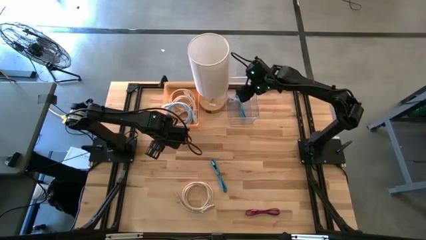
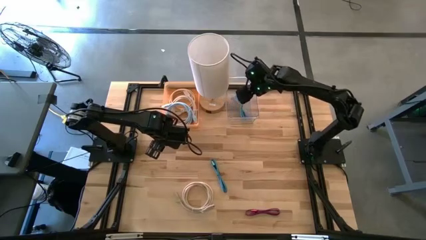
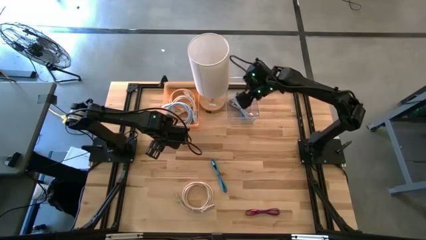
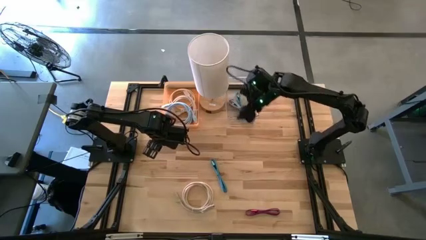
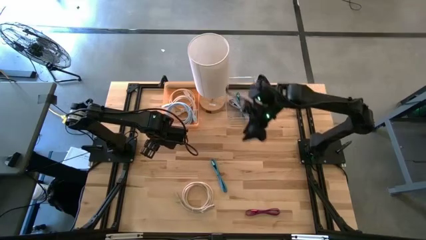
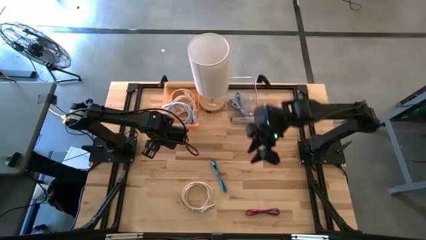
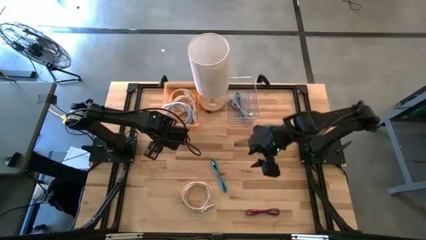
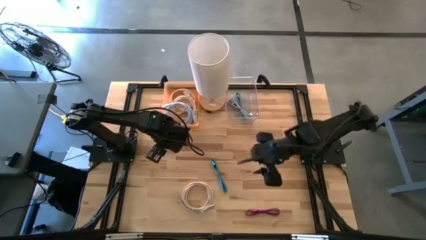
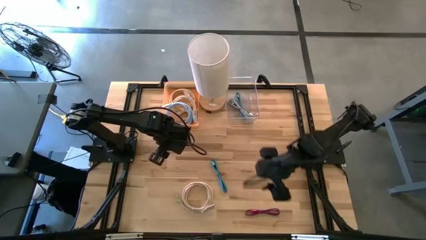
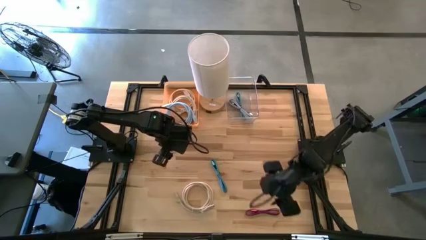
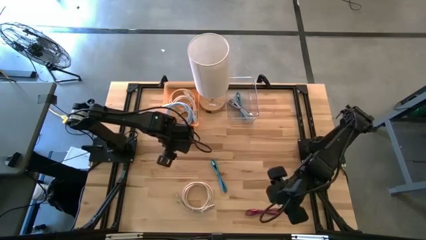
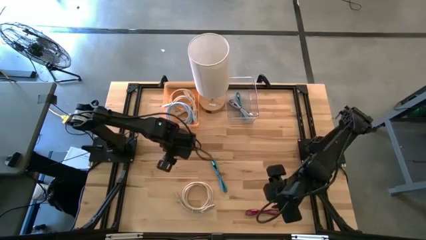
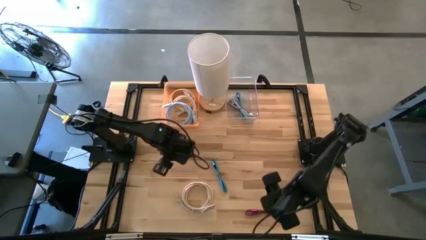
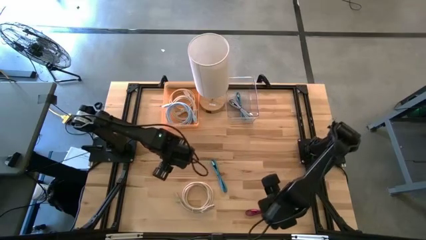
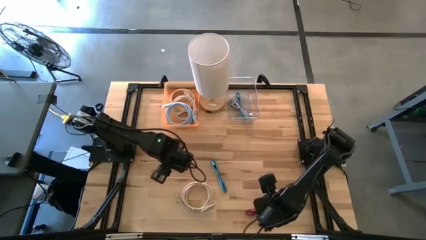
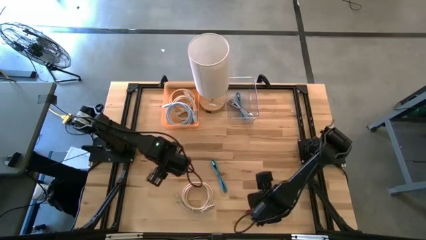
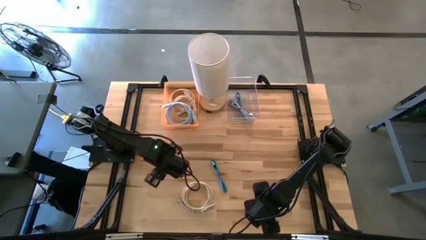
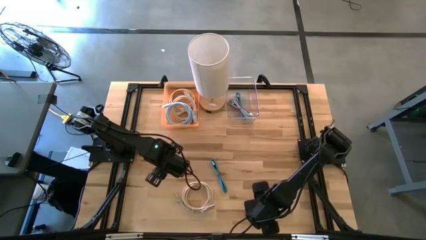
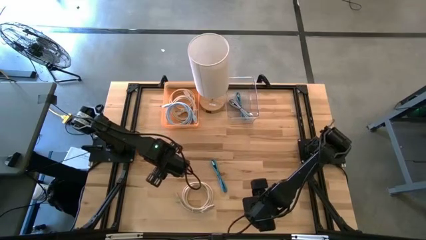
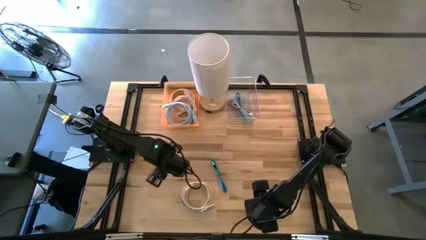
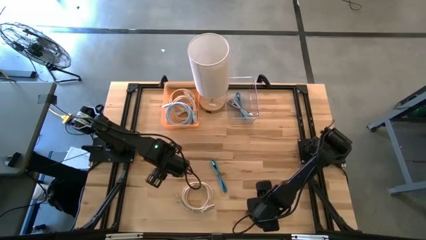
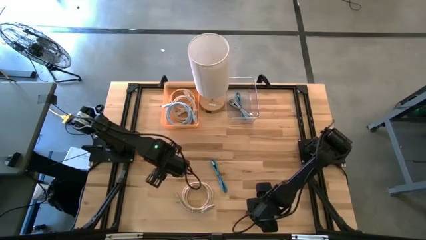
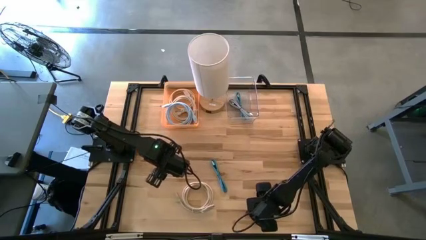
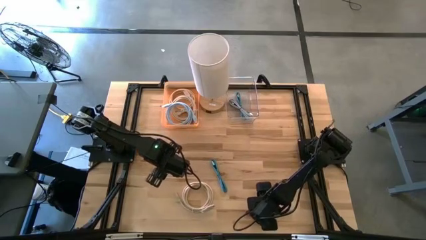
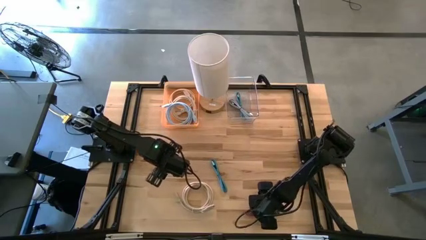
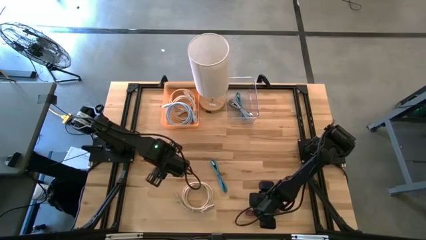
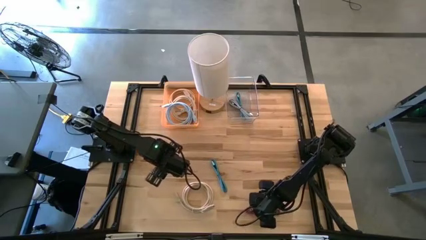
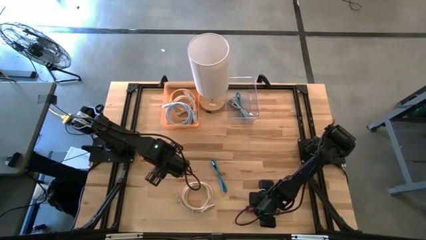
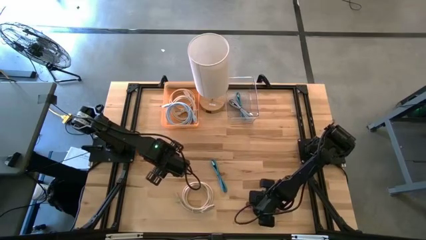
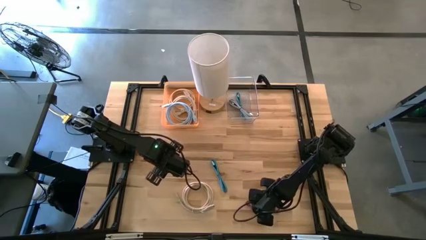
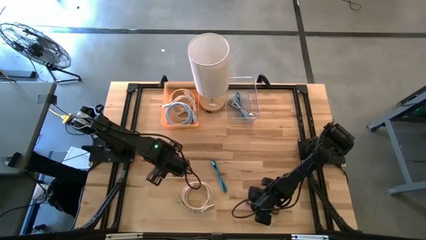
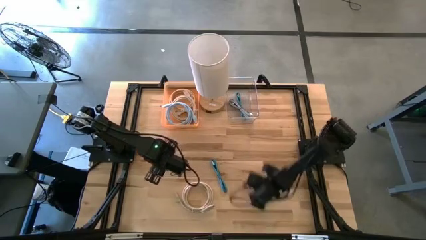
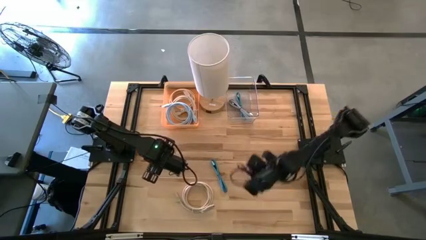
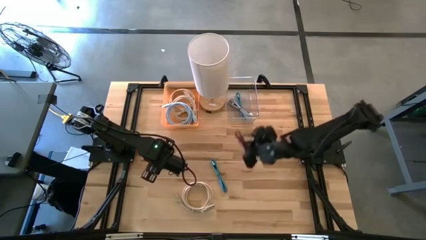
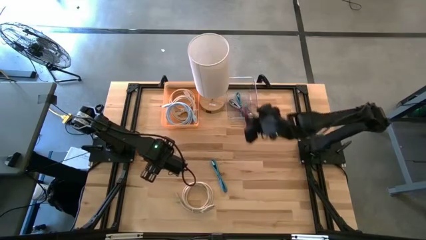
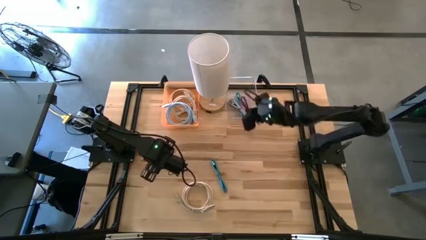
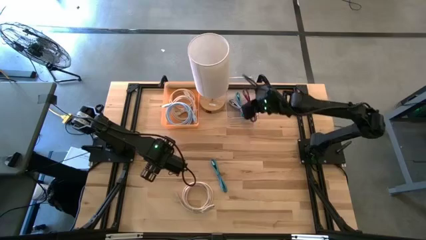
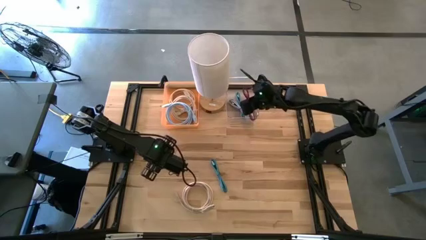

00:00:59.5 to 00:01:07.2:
Task: Pick & Place USB Port
Put the pink charger cable into the transparent bin

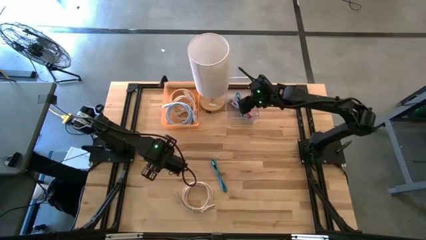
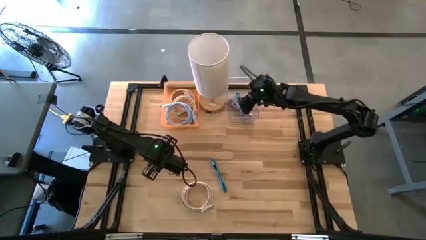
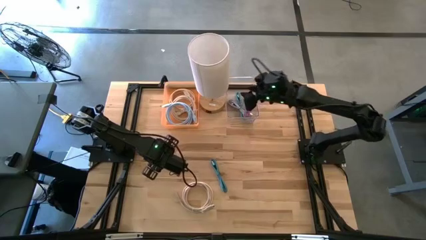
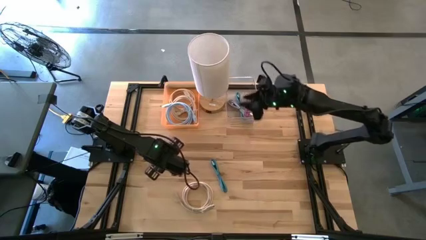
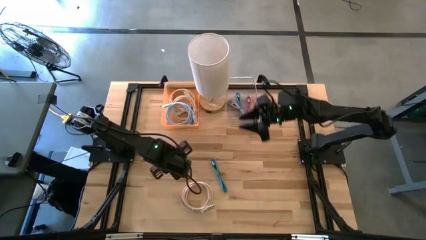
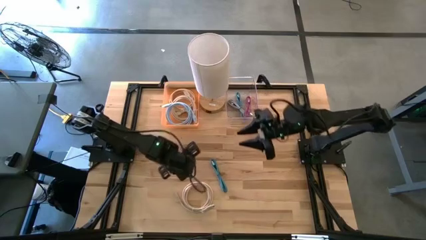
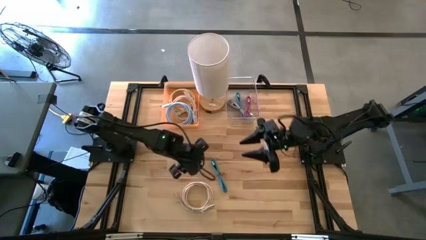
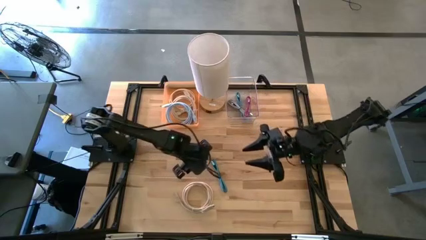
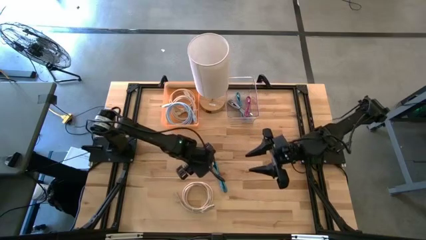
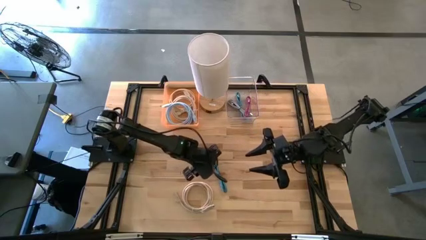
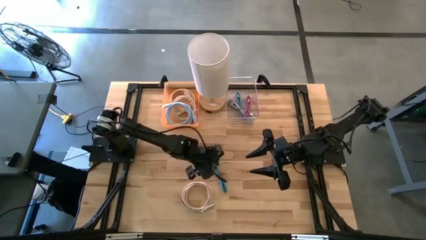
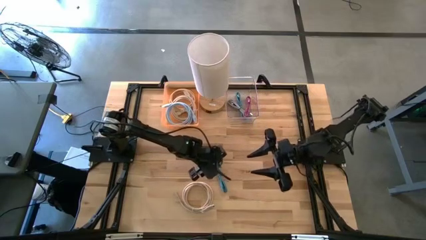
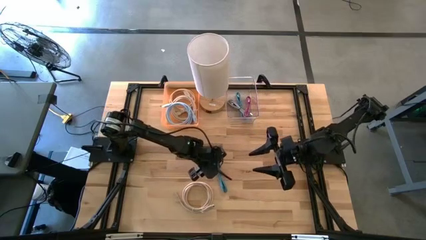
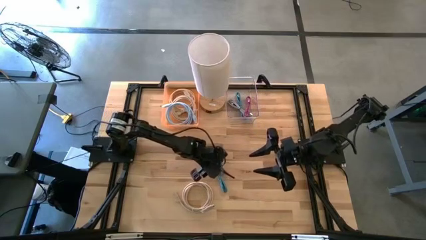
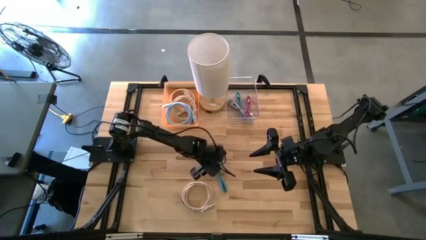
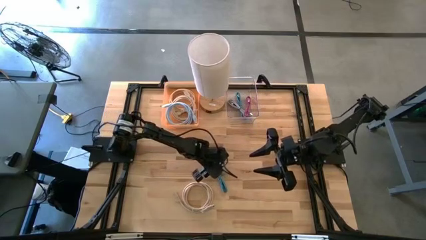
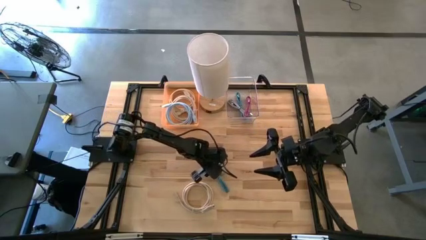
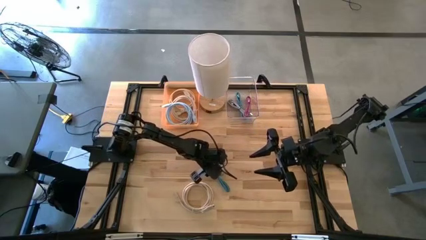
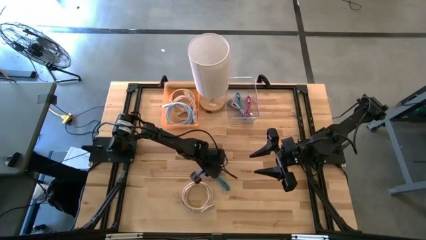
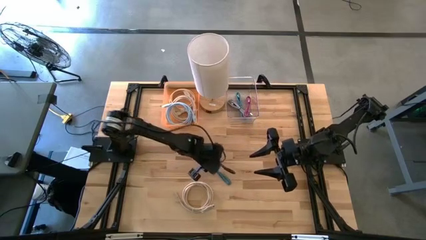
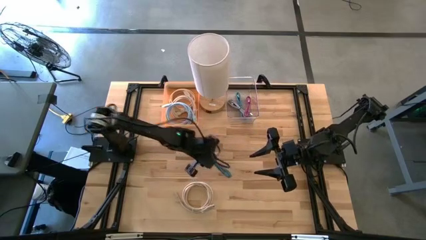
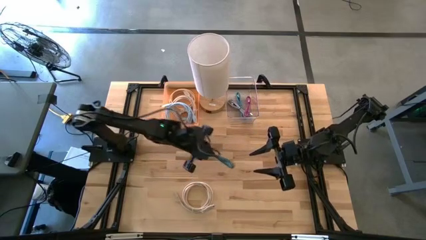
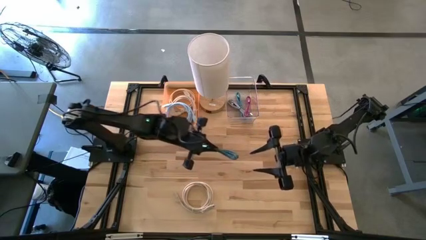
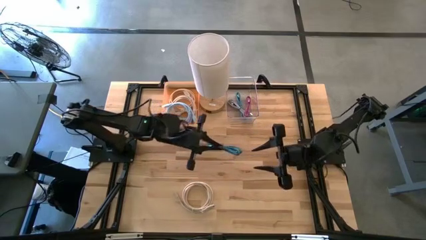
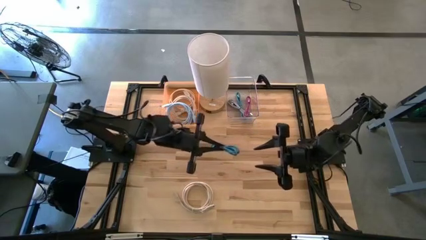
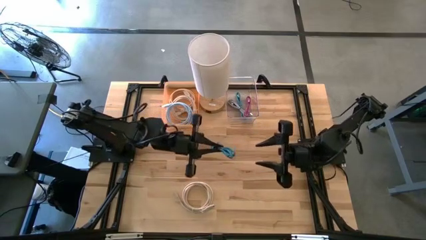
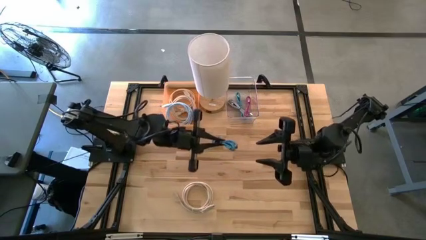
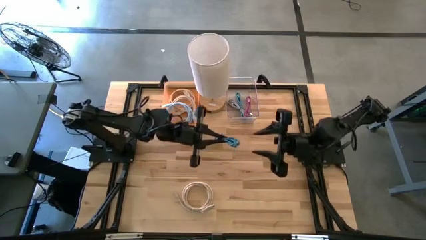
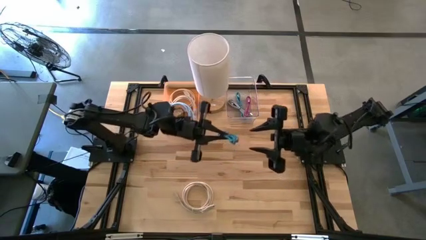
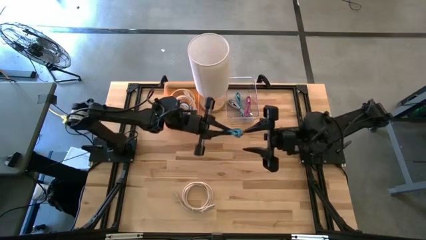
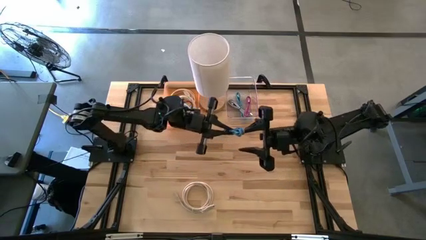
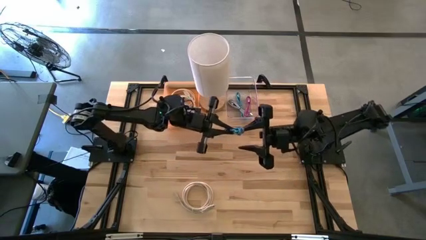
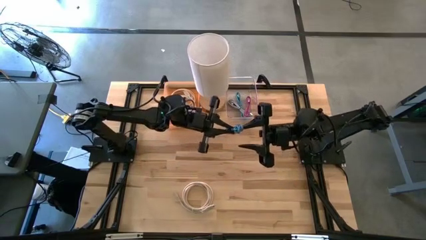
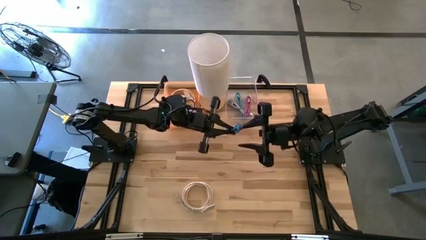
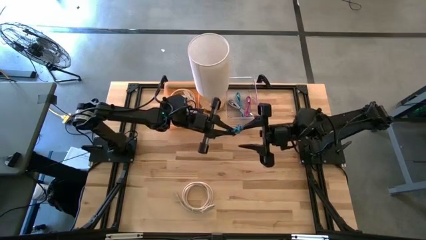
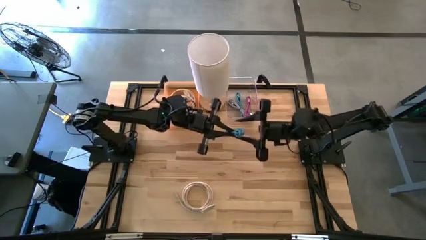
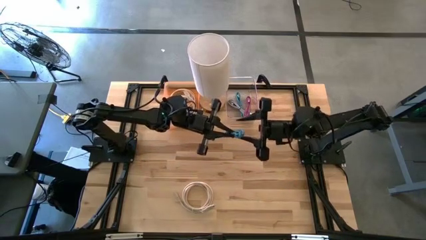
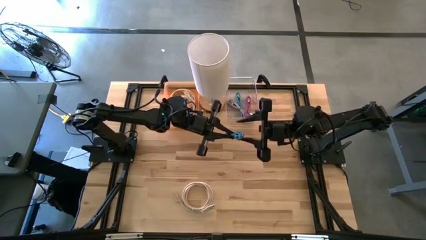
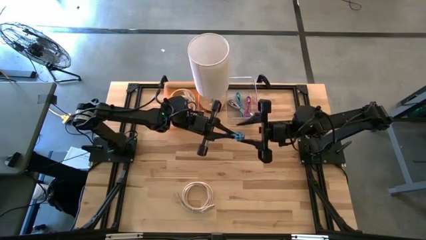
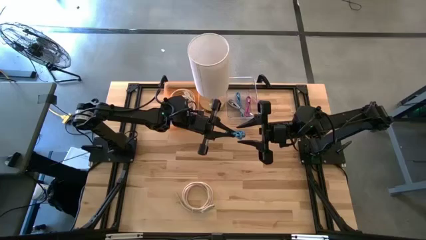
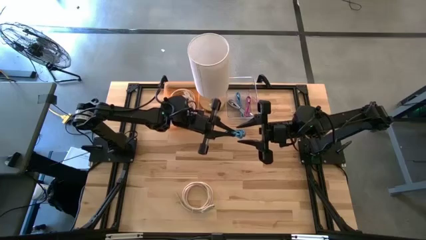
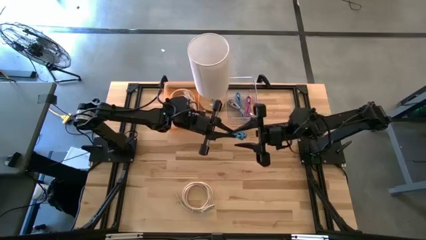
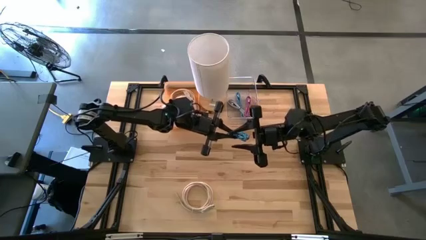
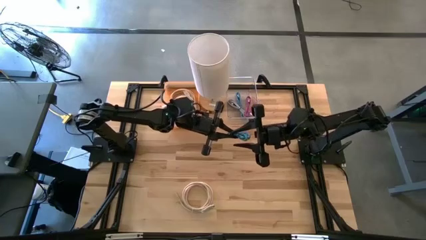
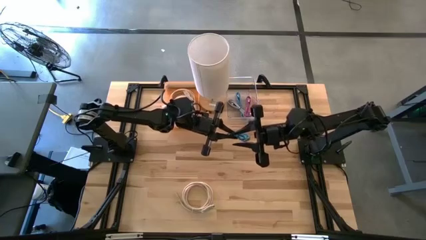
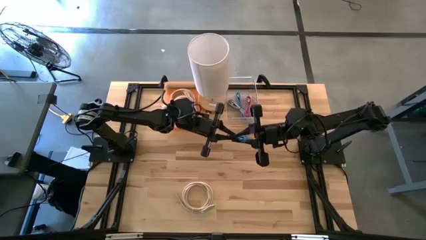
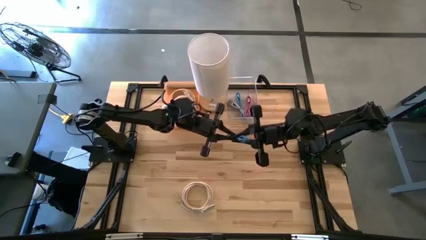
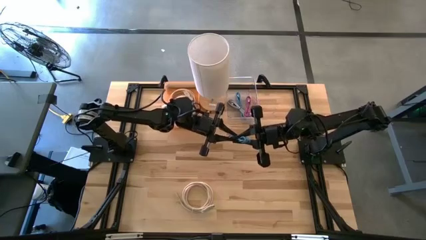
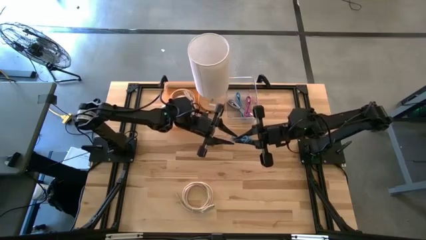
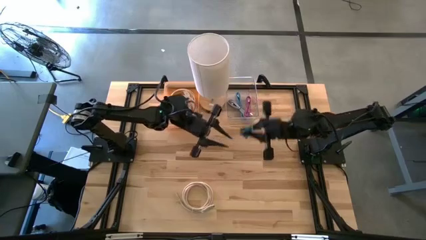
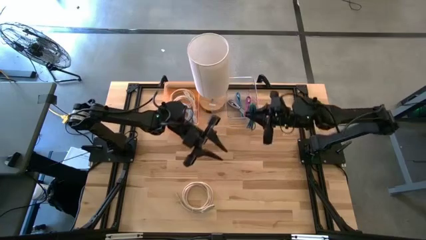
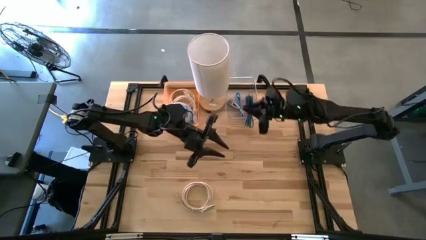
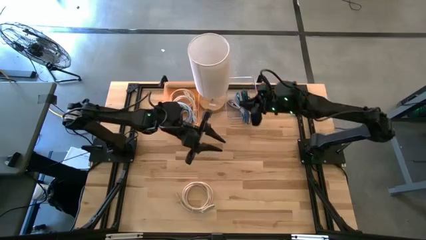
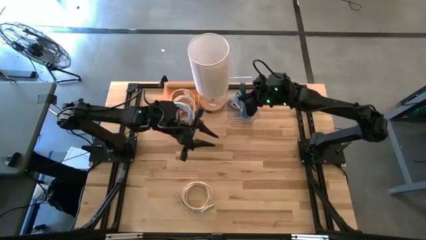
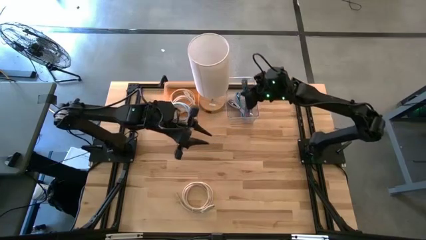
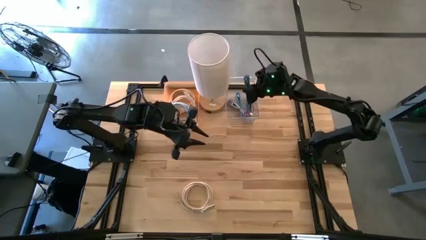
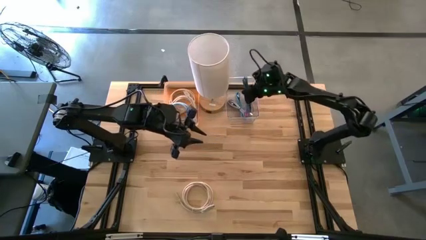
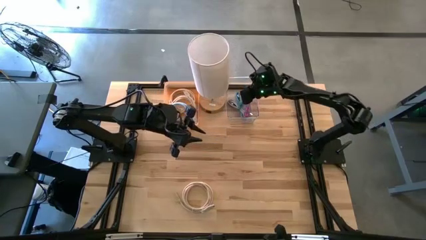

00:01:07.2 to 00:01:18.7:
Put the blue and black charger cable into the transparent bin
